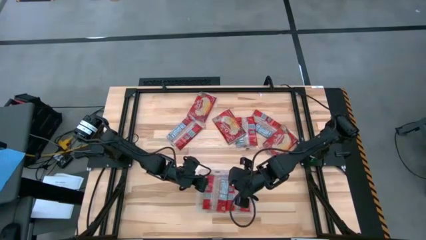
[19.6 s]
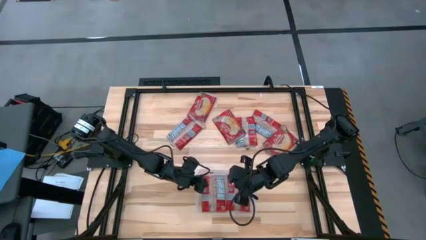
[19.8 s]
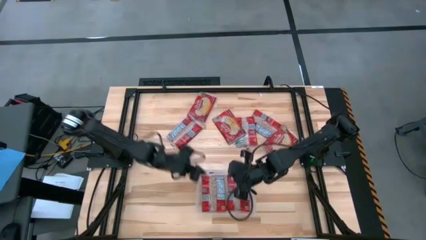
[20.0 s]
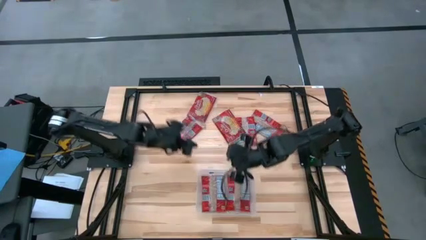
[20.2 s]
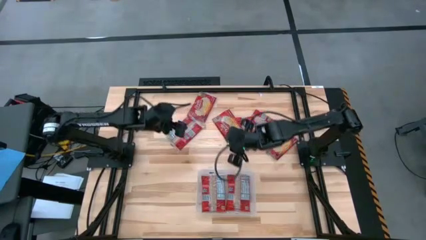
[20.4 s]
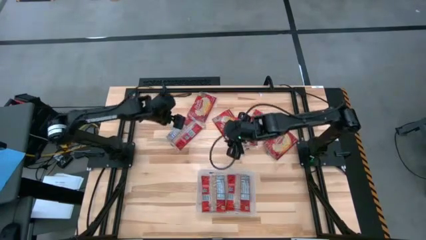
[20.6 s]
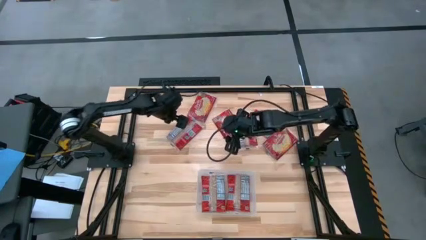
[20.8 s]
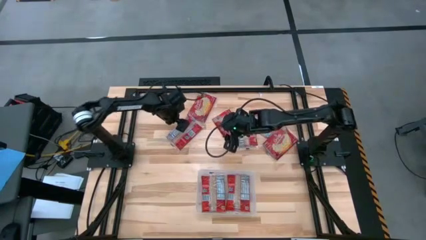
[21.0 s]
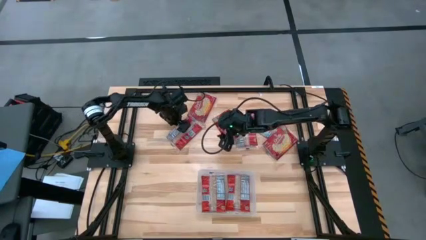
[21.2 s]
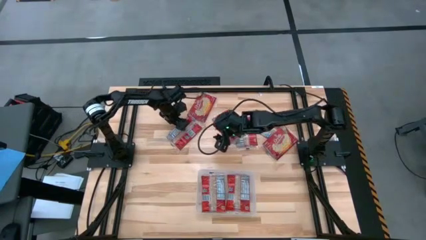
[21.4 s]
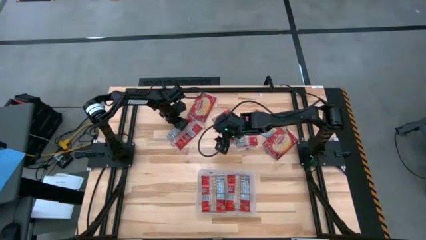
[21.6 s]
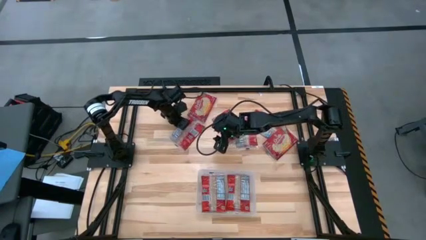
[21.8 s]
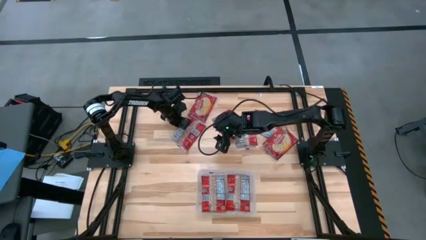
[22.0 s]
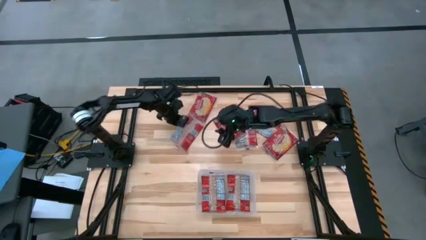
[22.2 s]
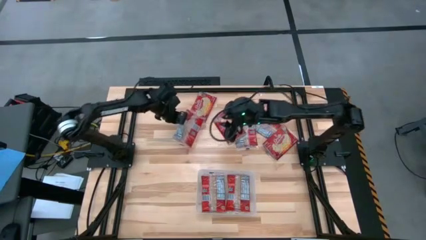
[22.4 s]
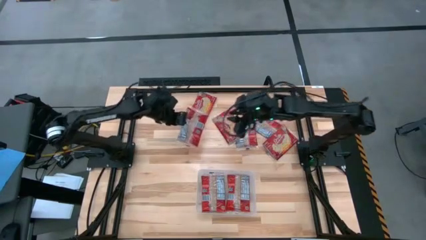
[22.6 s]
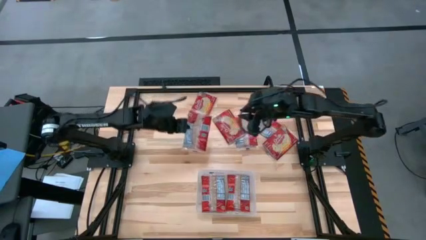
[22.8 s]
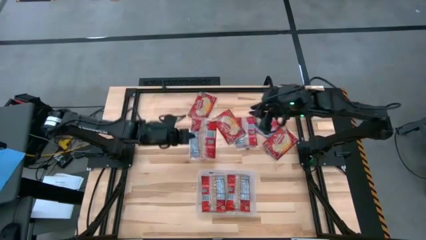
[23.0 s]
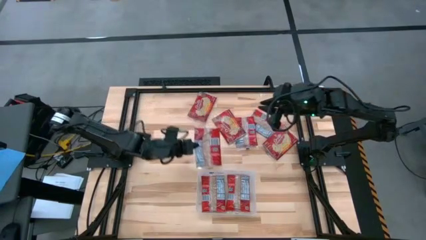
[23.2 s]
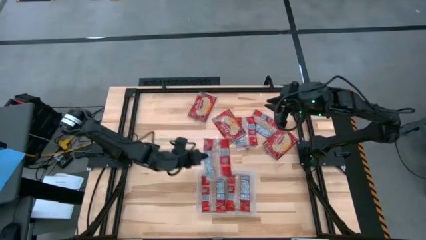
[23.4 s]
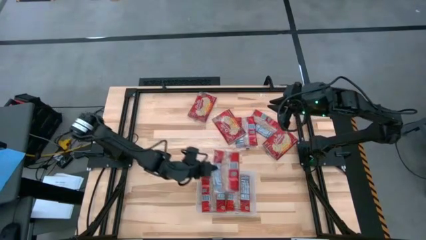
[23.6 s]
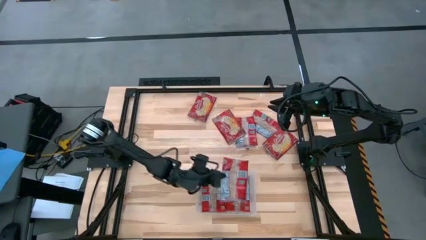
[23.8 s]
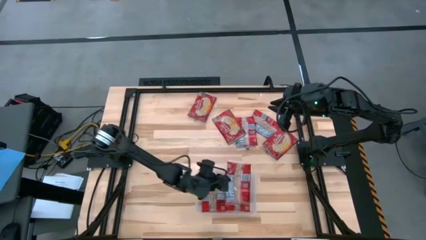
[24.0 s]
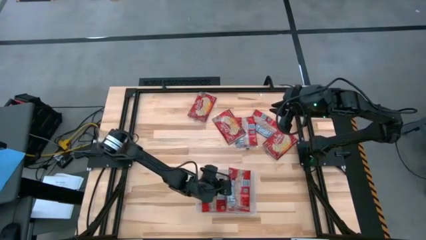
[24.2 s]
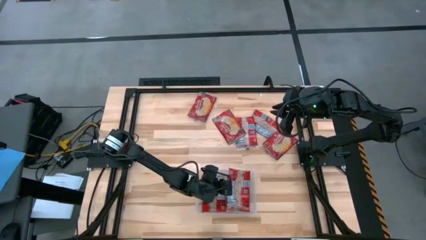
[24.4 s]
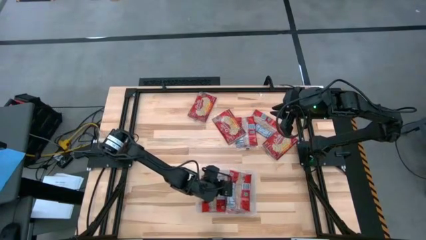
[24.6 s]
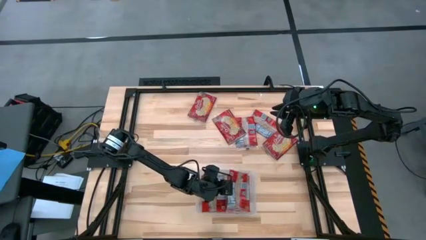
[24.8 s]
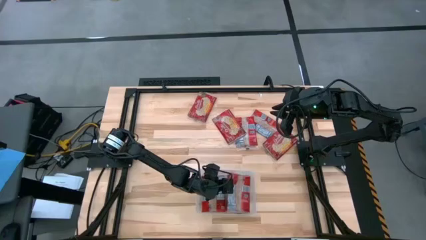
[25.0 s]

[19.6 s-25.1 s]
Task: Sort popcorn bags into baskets
Put the red popcorn bag into the white bin

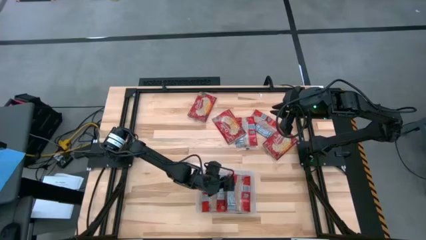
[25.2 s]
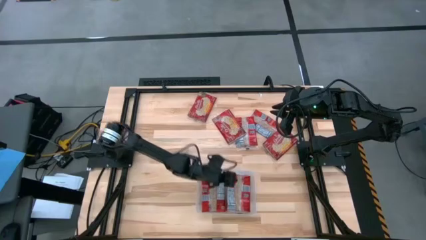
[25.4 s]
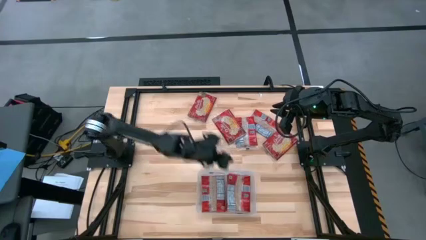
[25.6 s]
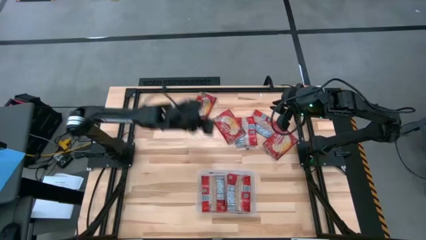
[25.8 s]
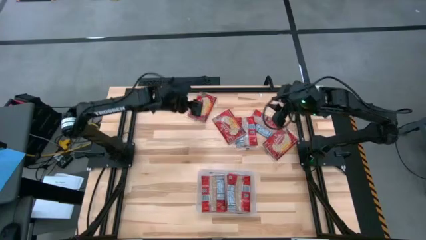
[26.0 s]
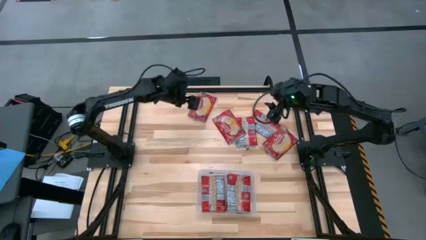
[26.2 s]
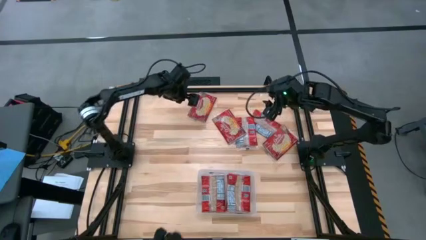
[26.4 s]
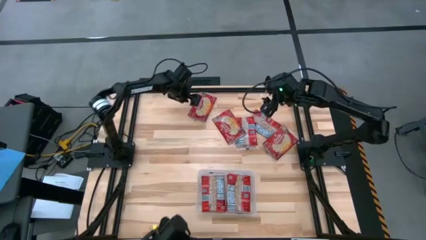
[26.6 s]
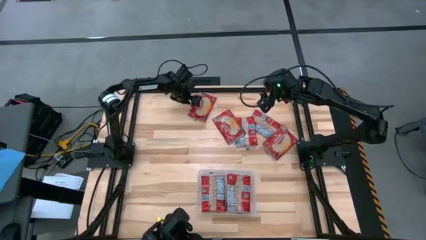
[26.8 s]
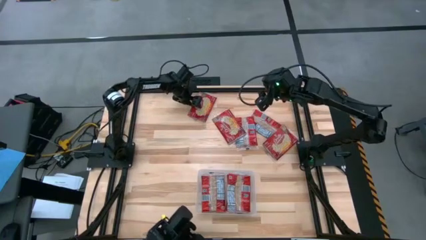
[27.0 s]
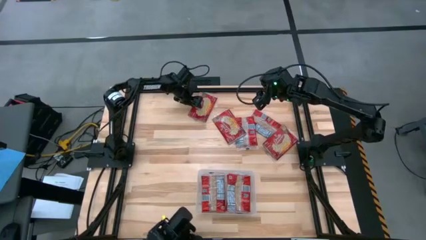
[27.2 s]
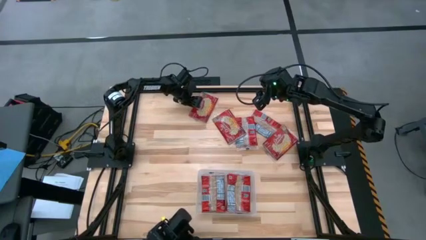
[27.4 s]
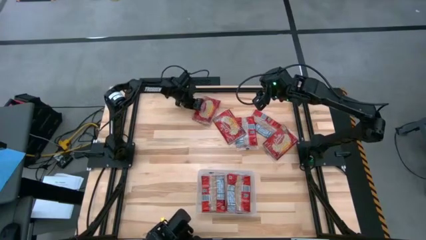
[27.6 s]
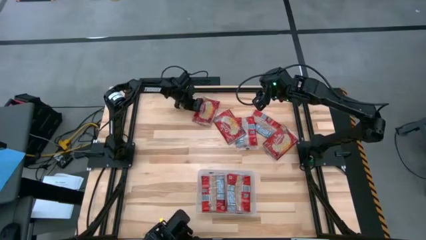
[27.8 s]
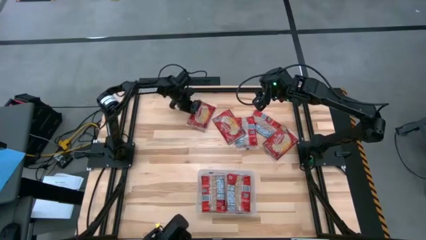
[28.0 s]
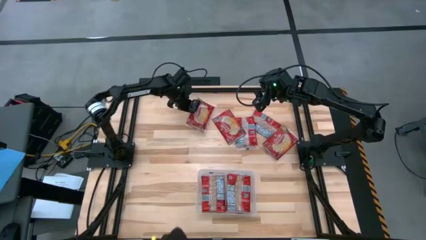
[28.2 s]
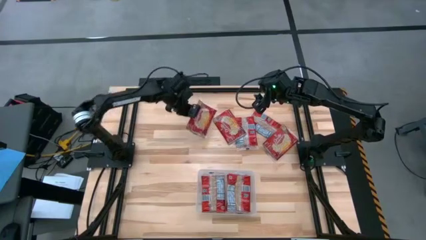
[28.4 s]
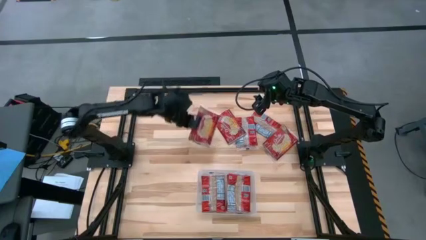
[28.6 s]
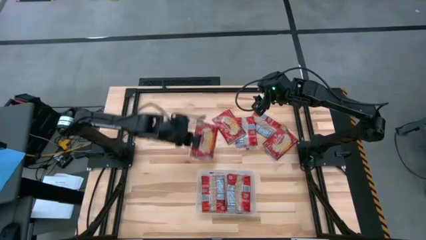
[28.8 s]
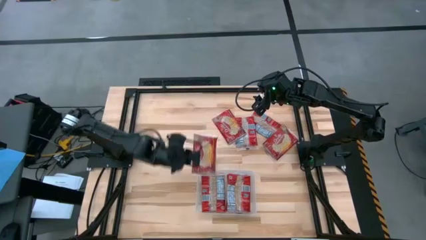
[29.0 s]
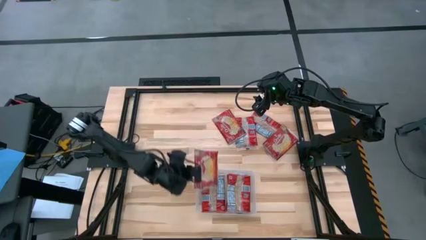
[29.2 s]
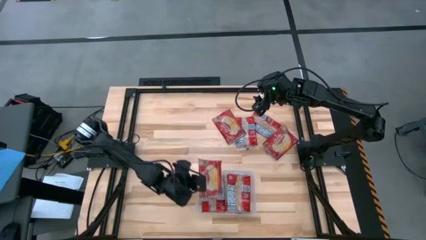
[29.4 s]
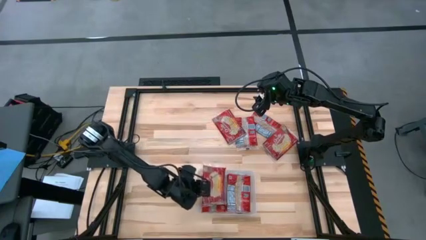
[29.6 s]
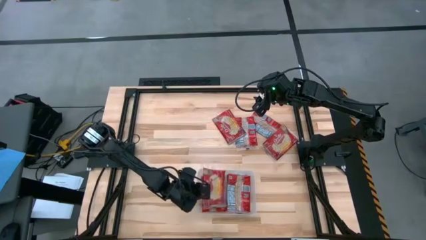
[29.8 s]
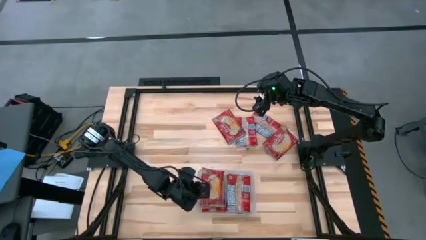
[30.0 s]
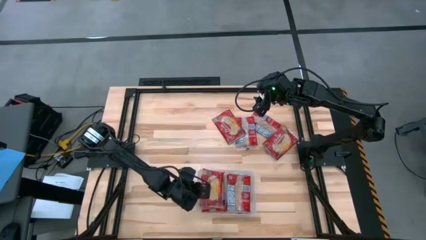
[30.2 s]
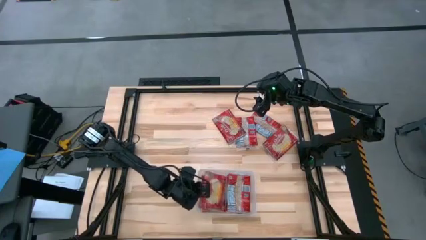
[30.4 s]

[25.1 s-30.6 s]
Put the red popcorn bag into the white bin

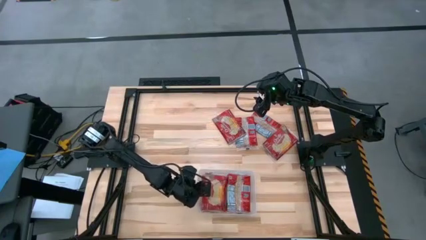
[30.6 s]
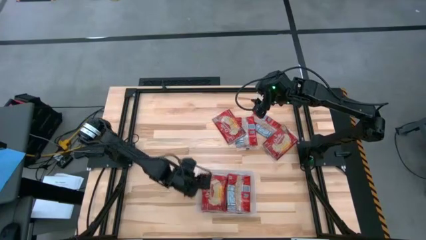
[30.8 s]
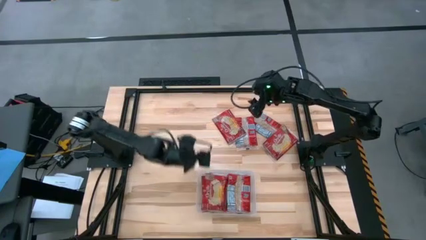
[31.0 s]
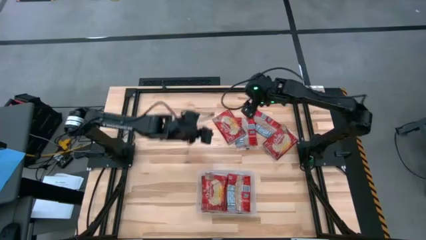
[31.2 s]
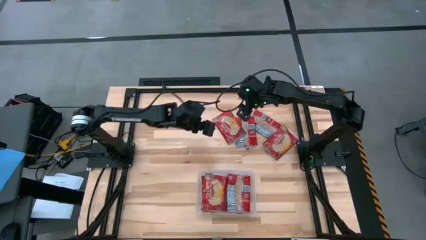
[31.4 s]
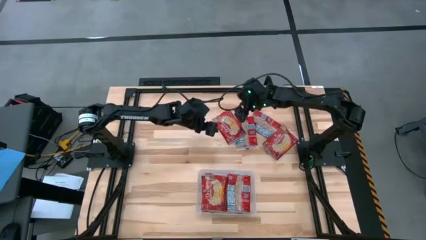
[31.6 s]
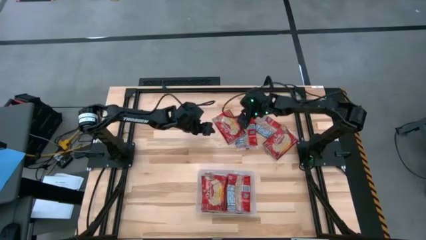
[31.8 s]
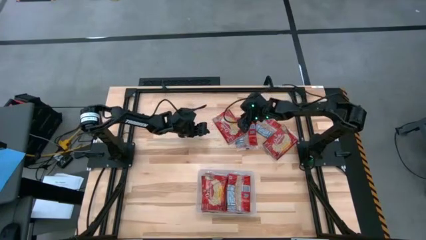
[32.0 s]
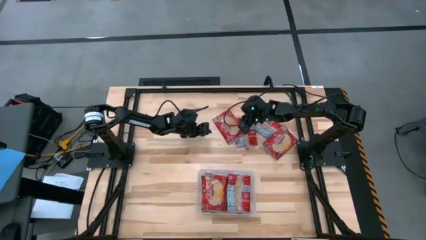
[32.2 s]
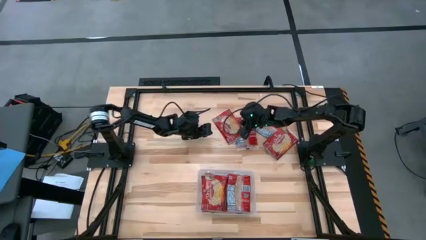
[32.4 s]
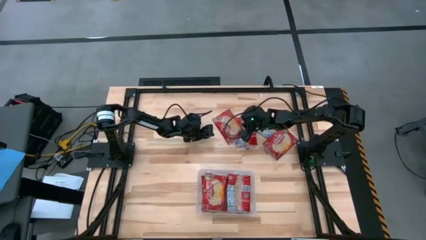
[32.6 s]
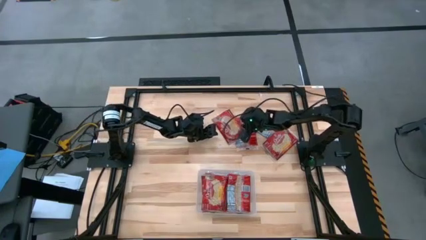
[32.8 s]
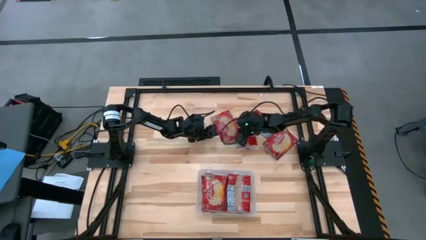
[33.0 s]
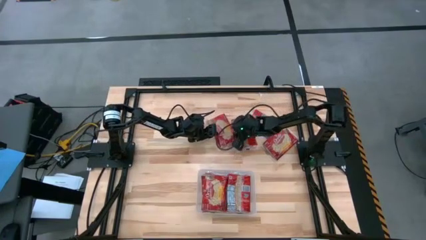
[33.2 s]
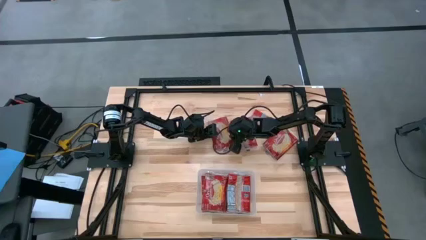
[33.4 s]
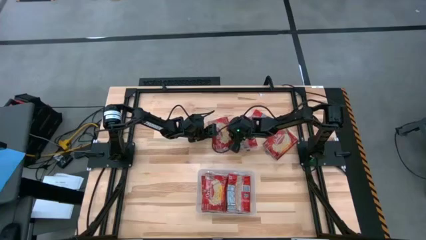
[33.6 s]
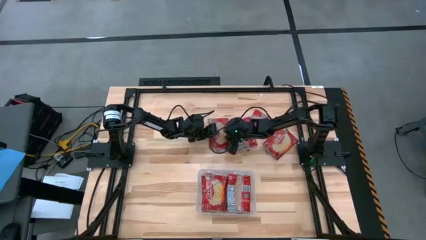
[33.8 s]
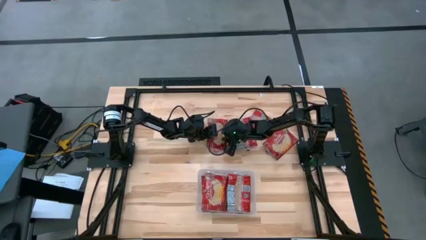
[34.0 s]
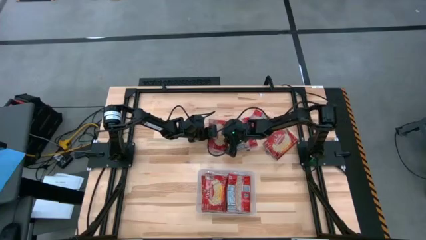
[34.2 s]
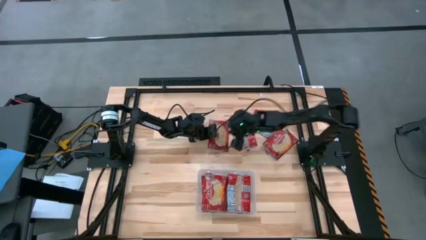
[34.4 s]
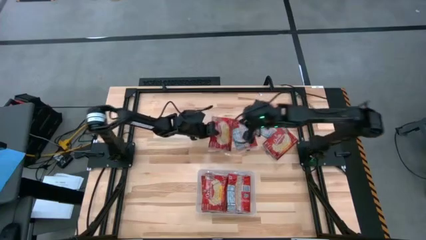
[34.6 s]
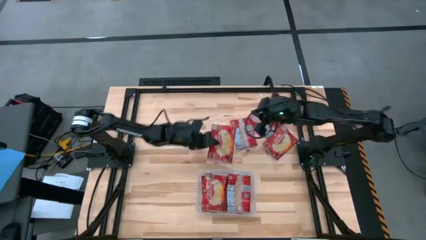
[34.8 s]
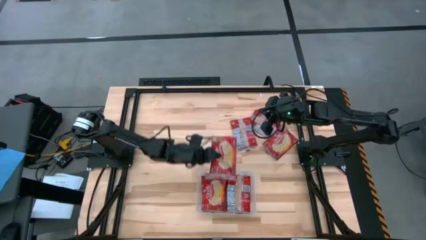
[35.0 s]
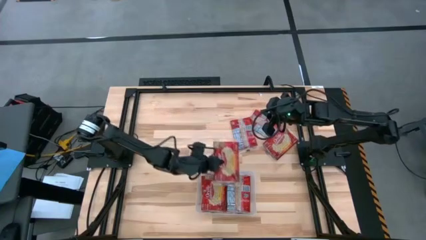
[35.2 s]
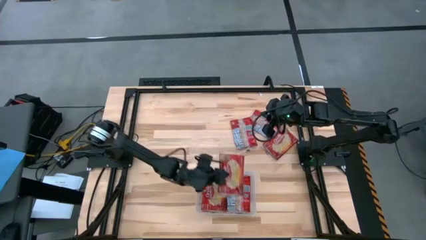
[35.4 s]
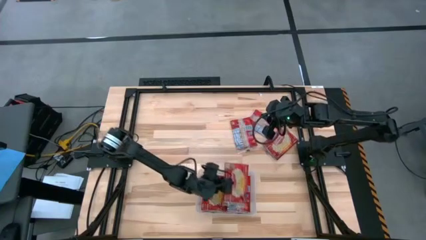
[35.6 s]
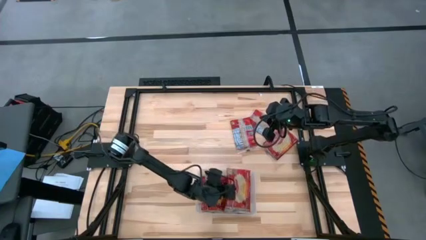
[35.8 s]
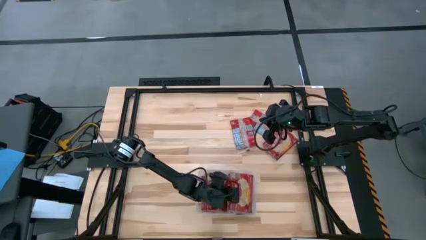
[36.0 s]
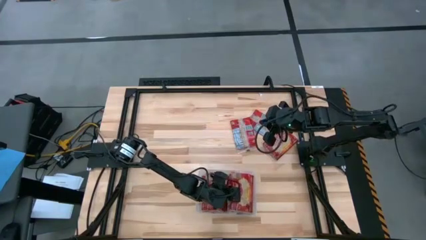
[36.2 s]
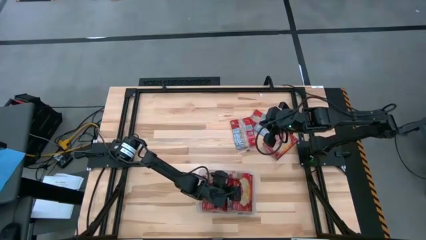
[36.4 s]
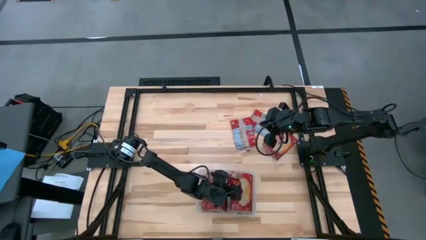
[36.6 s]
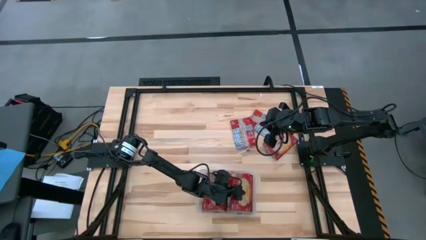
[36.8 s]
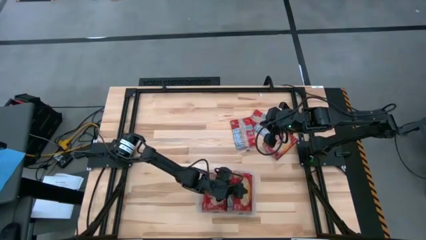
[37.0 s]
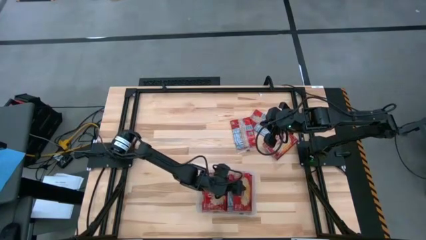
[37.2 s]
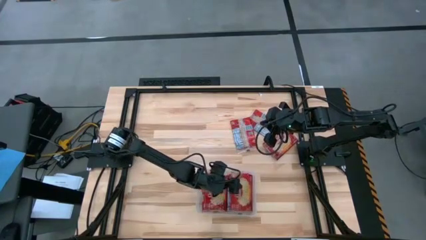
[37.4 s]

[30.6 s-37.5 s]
Put the red popcorn bag into the white bin
